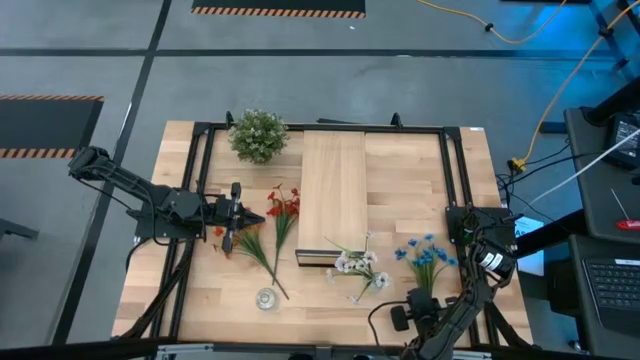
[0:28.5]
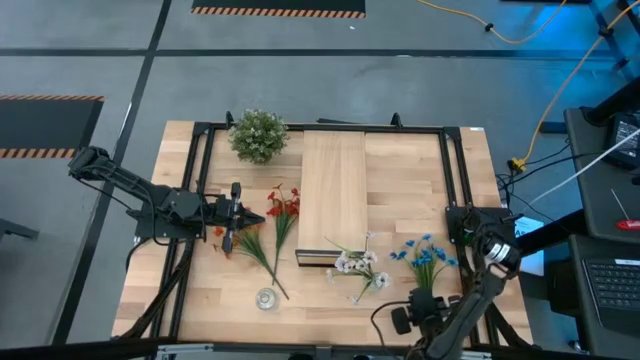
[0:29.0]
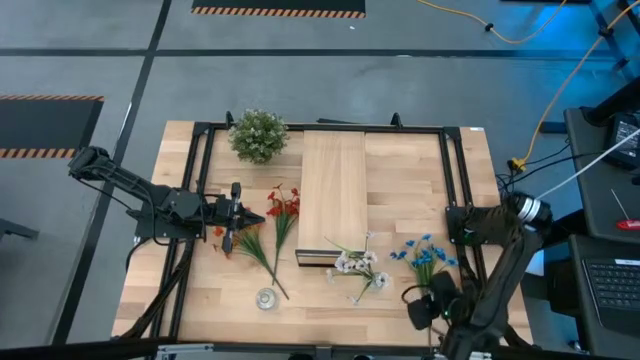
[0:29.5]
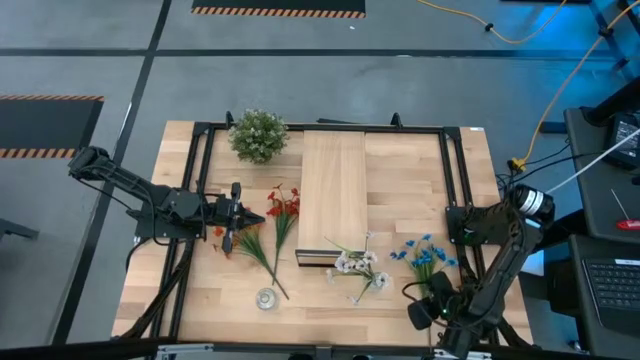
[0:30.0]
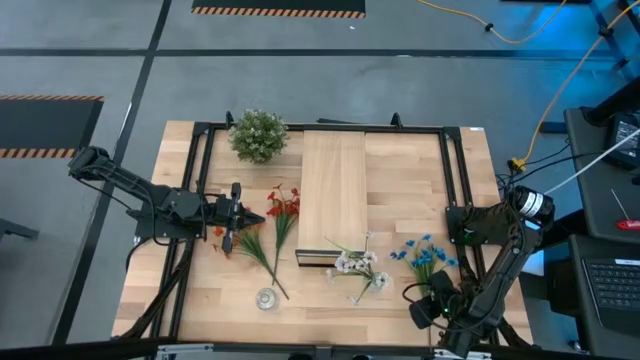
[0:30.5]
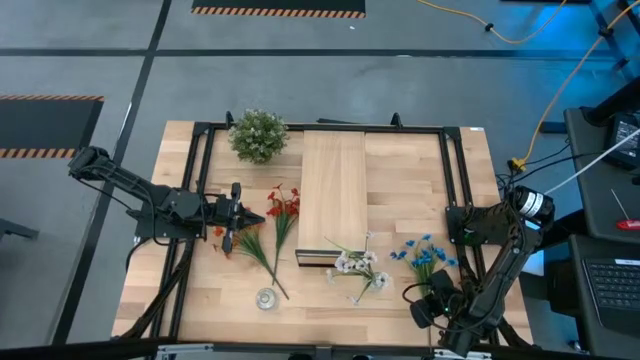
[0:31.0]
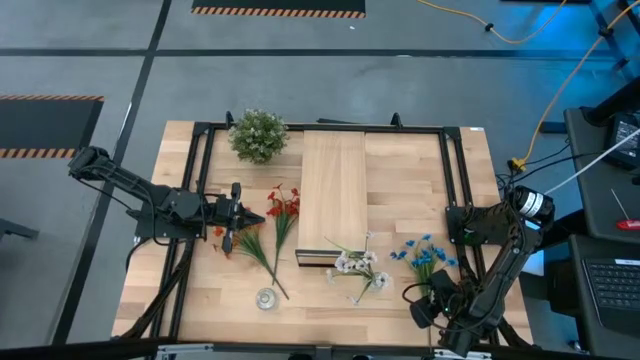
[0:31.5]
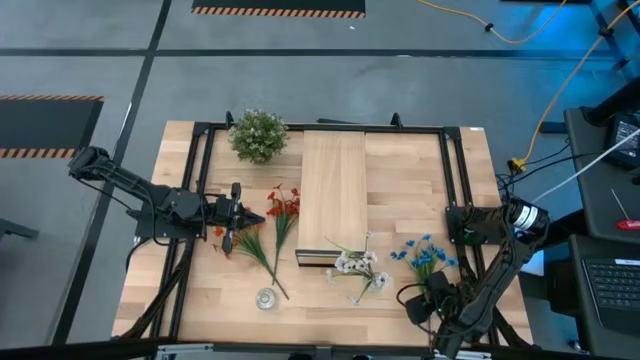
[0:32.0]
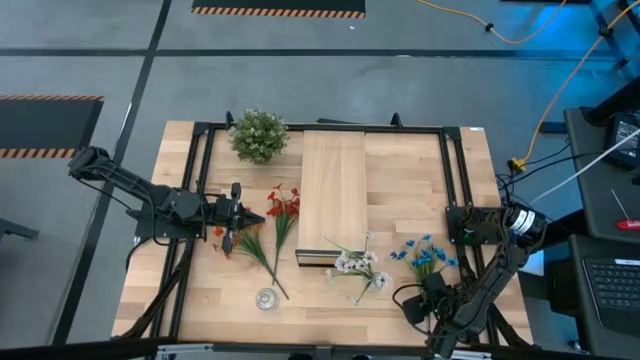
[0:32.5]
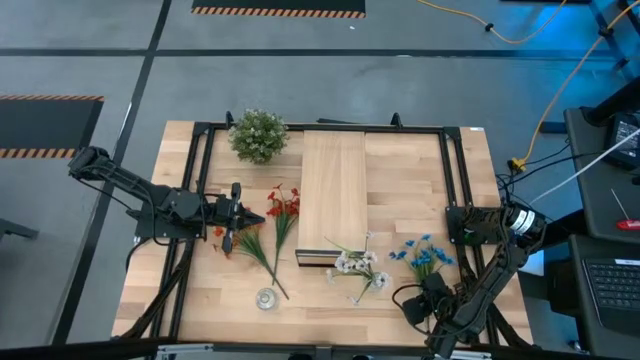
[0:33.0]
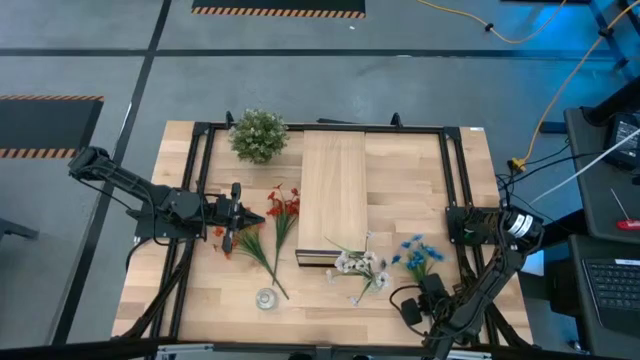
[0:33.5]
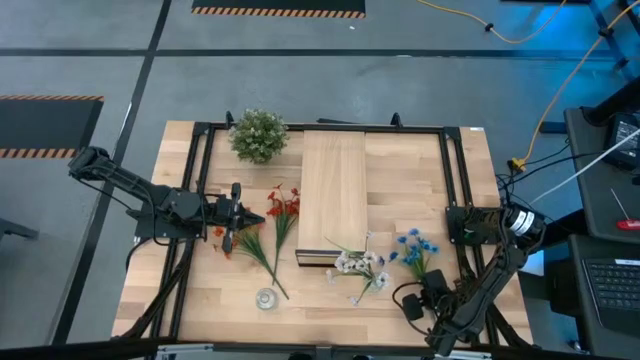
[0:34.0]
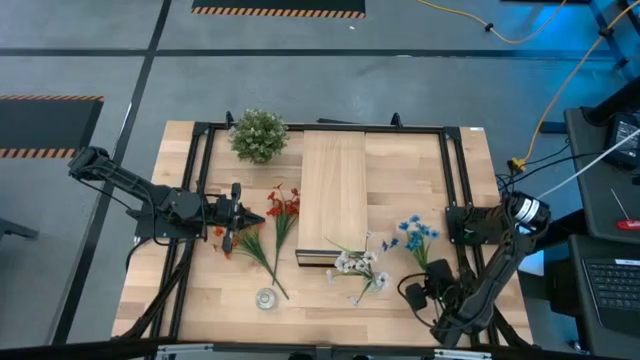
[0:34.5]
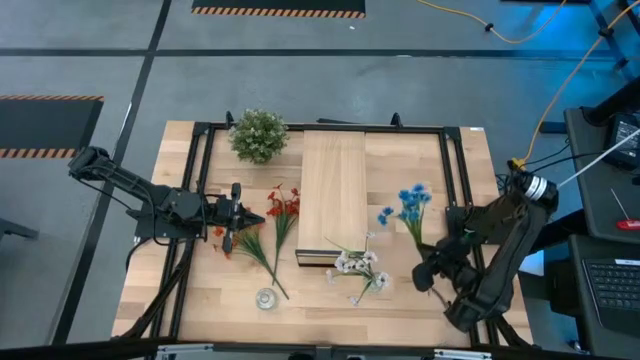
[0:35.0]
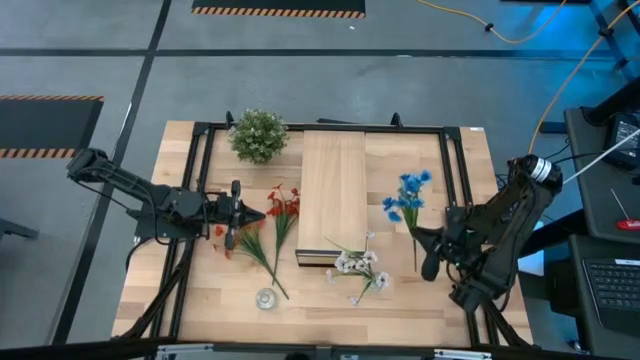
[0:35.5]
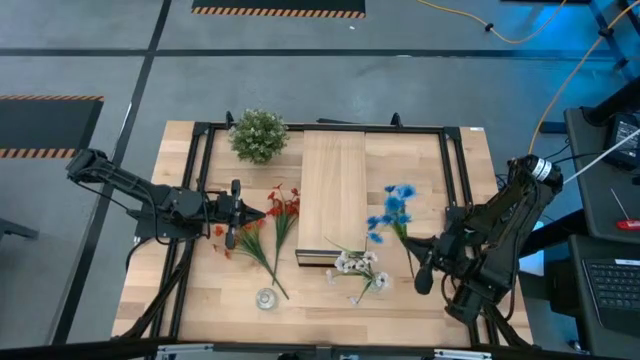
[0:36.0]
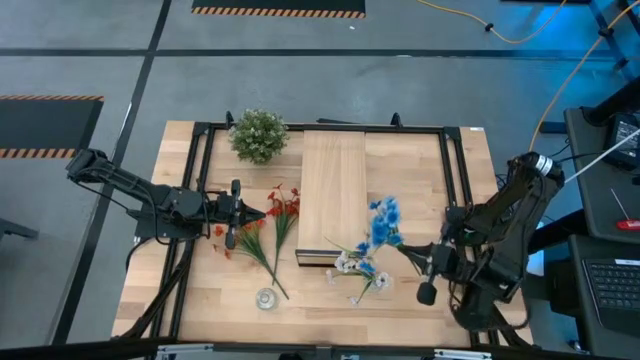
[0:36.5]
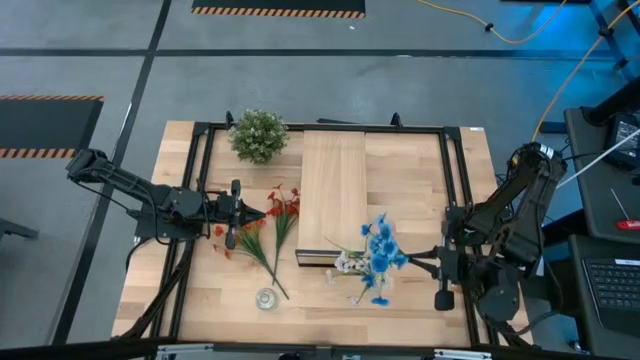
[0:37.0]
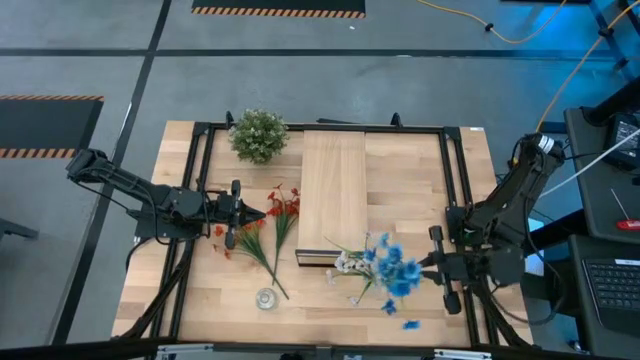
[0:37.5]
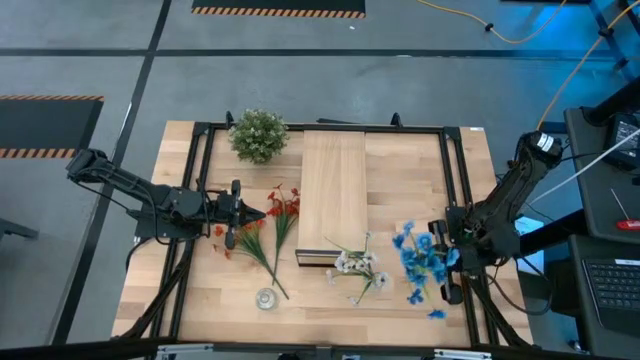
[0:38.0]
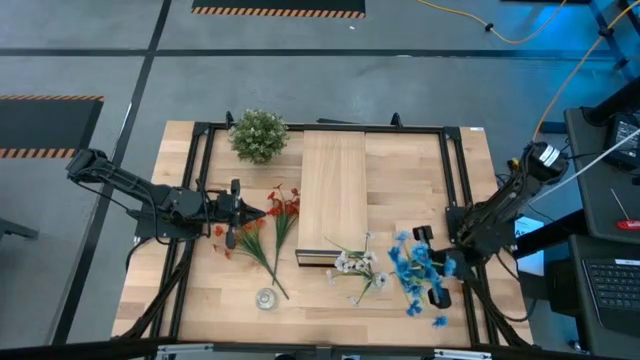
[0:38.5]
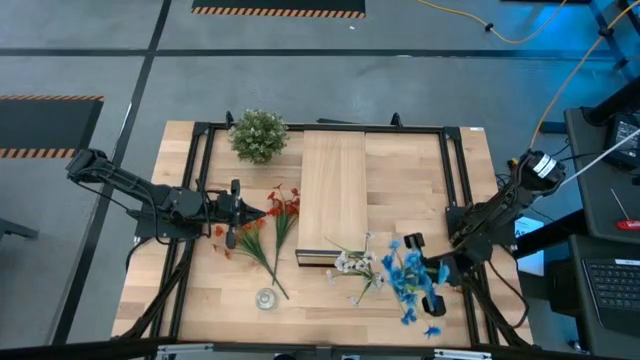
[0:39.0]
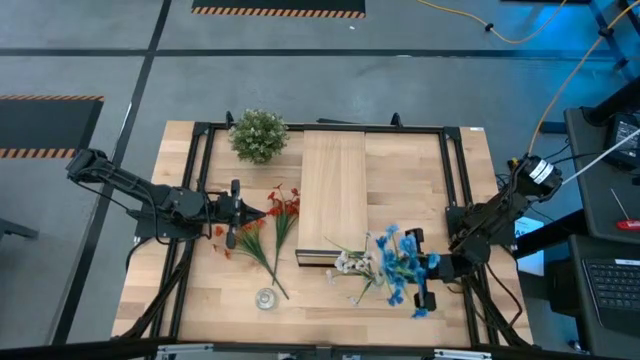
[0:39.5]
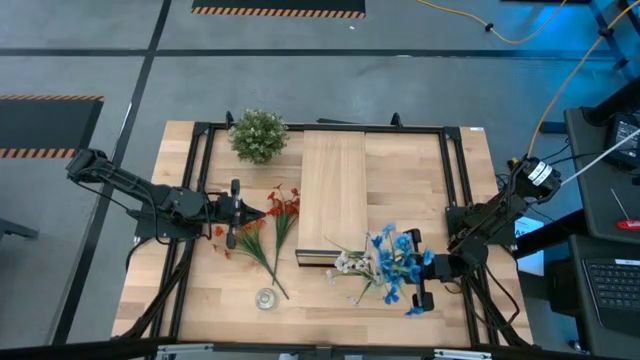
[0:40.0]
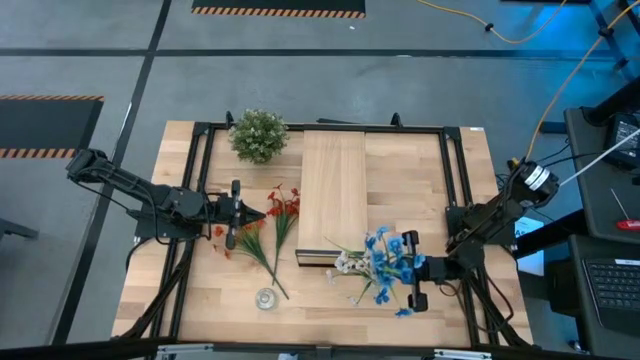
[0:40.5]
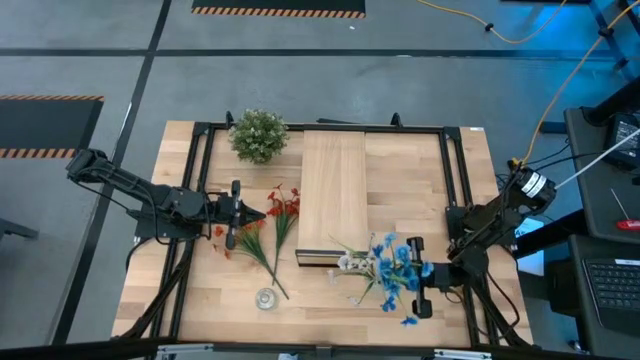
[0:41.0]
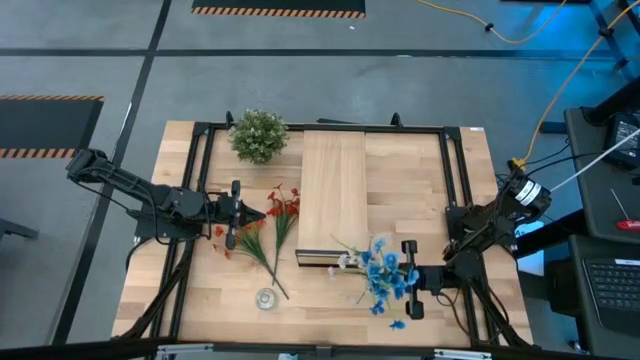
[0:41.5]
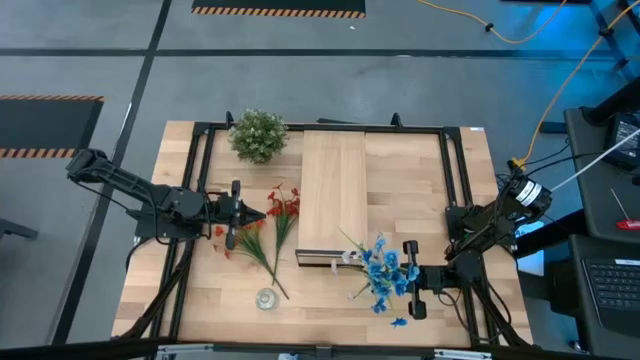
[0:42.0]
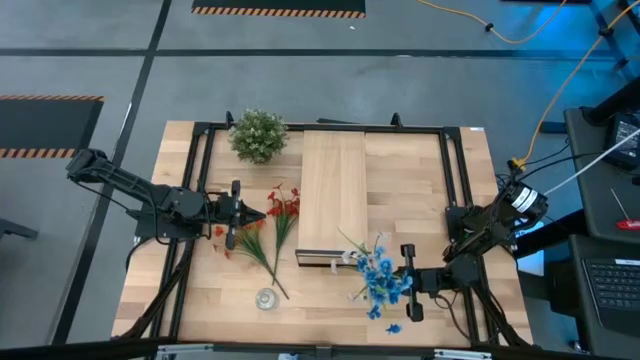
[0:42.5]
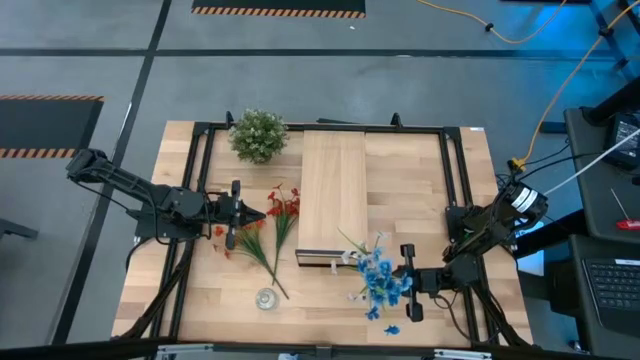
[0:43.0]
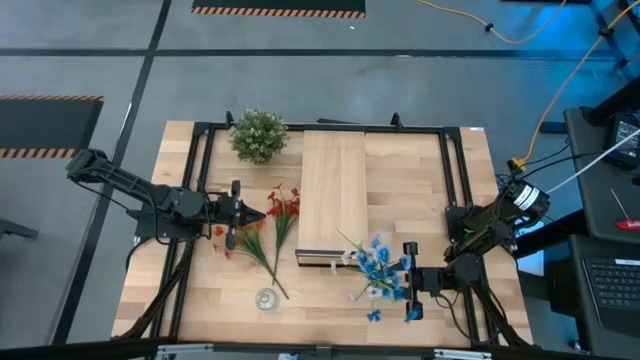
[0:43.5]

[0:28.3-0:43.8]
Task: Pick and place flowers into a vace then onto a shelf
Put the blue flowers into the right transparent flower vase

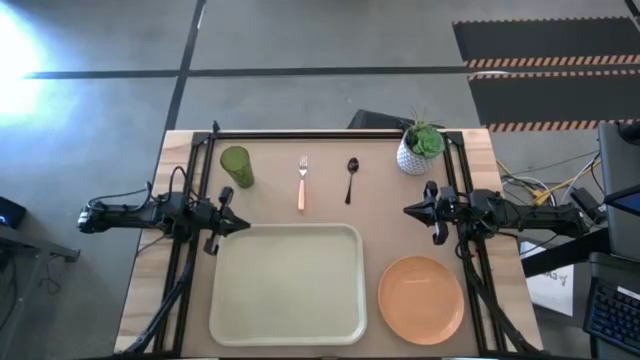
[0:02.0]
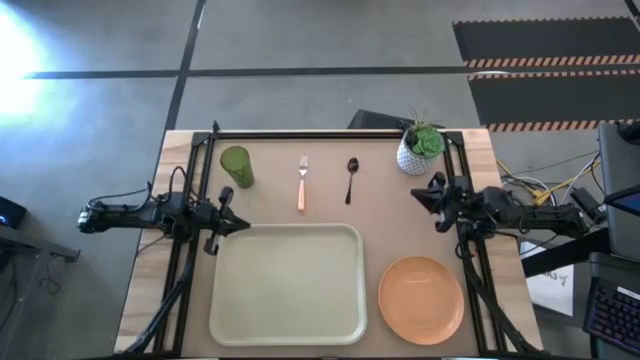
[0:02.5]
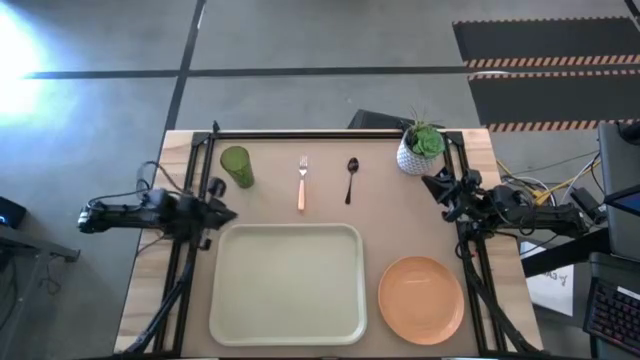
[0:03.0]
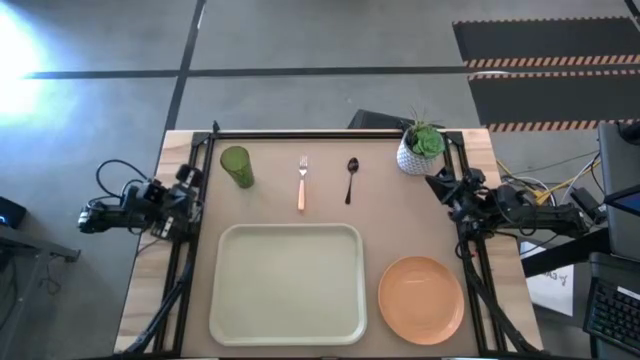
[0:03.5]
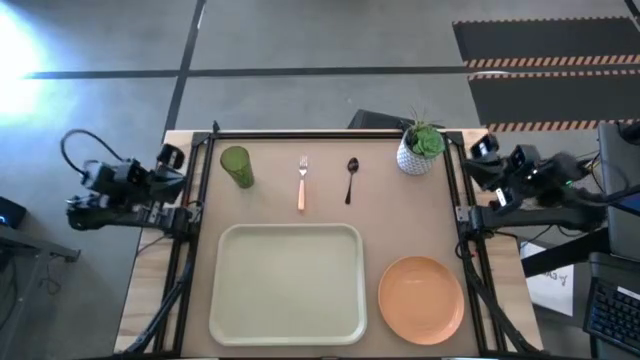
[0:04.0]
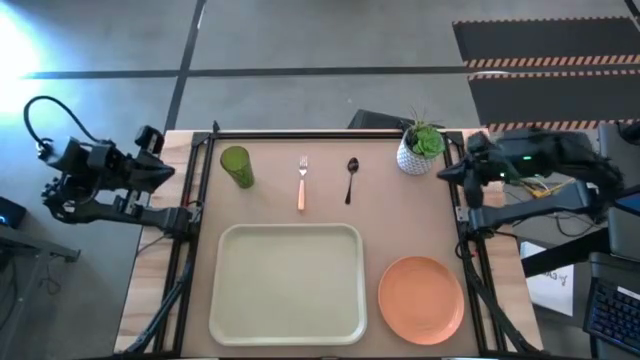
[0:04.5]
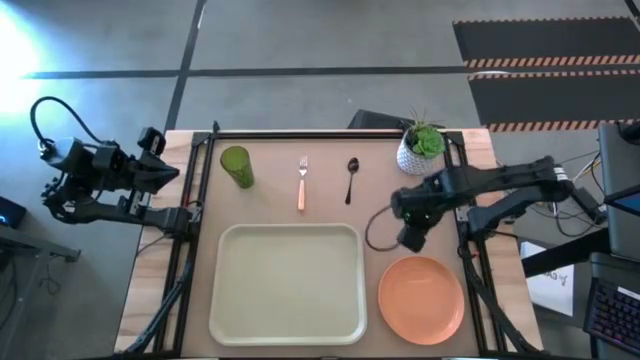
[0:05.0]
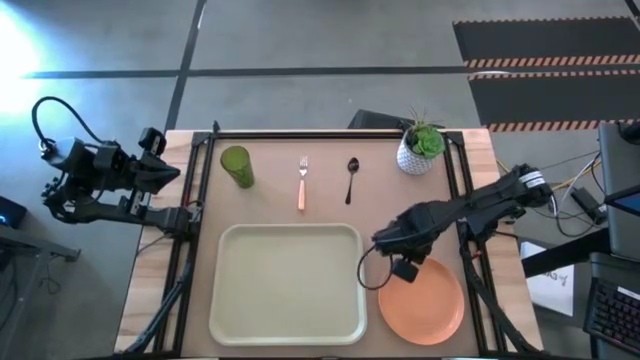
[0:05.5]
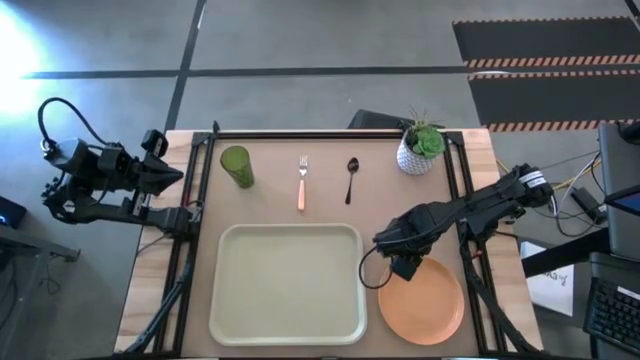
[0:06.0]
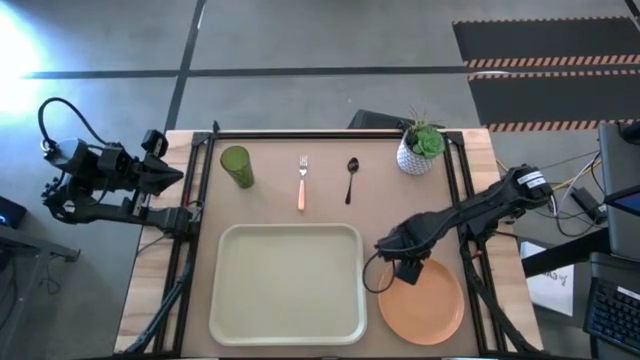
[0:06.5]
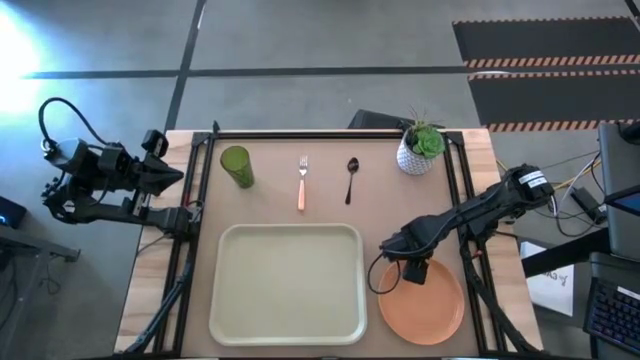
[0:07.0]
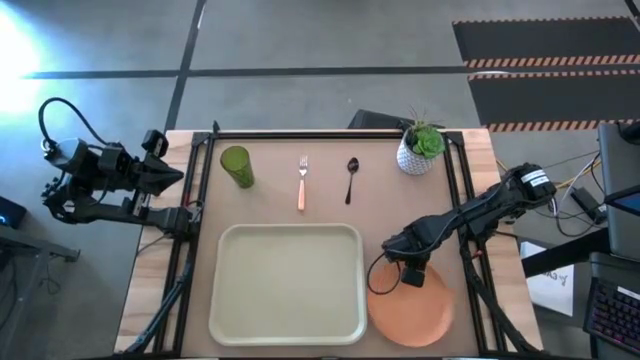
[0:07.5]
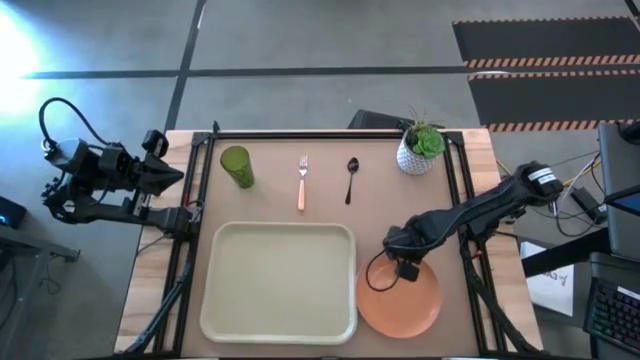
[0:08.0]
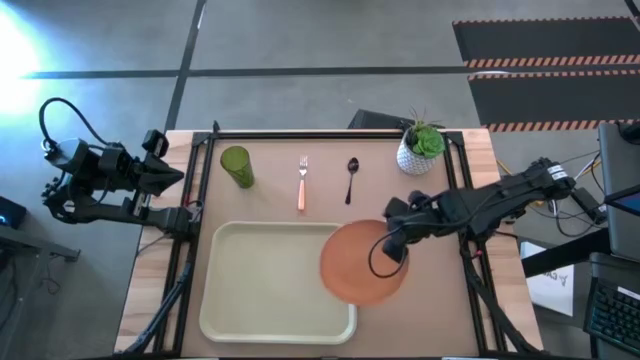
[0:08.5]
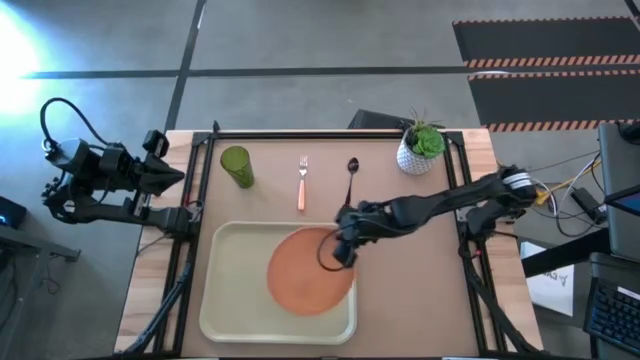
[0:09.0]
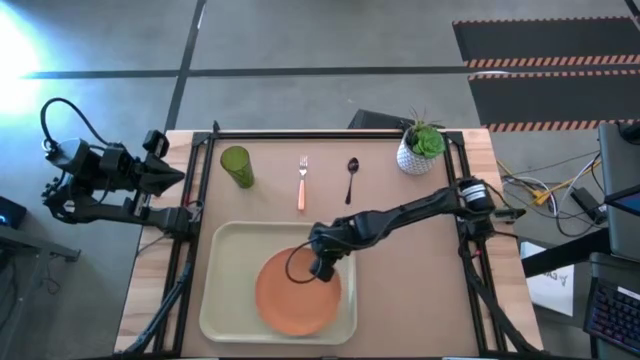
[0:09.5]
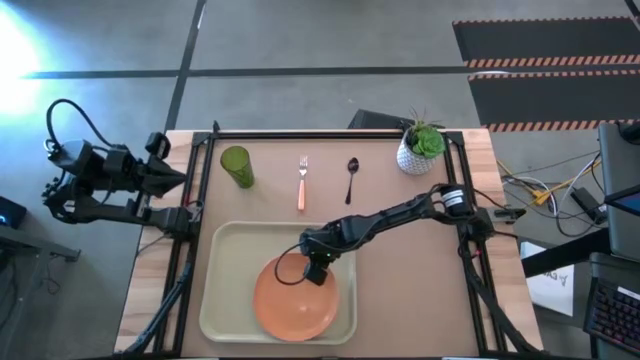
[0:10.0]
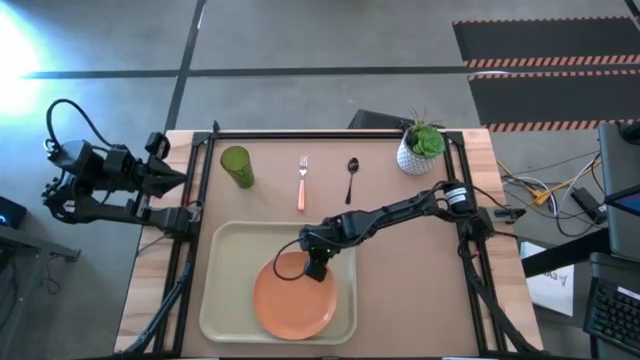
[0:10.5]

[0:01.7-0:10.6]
Task: Pick and place plate/cup/fork/spoon on tray
Put the orange plate on the right side of the gray tray
